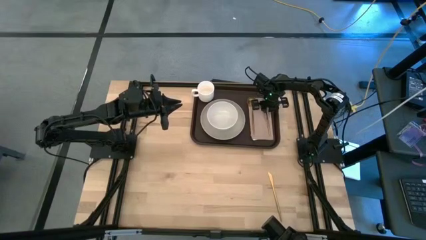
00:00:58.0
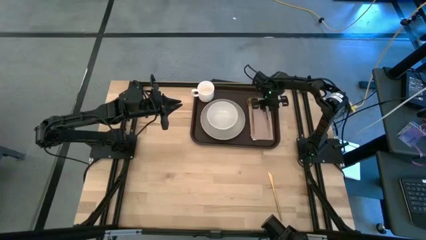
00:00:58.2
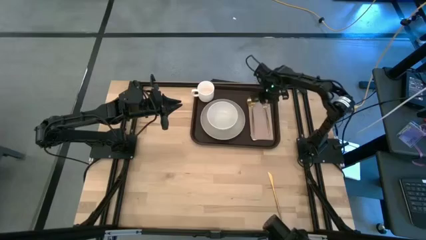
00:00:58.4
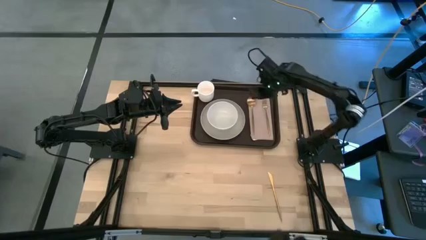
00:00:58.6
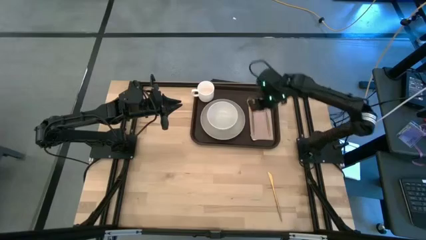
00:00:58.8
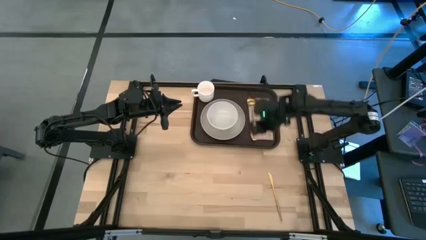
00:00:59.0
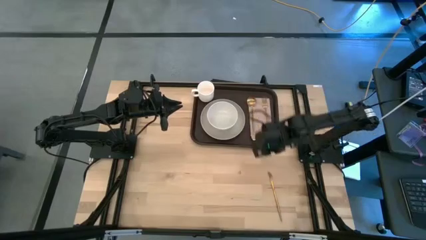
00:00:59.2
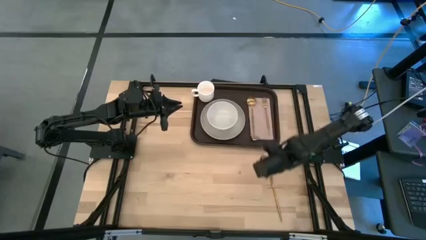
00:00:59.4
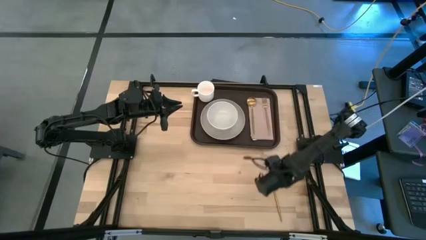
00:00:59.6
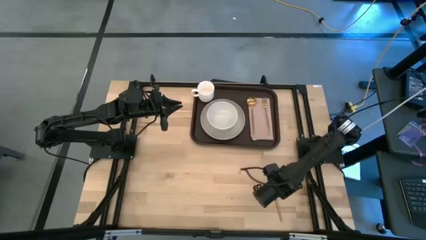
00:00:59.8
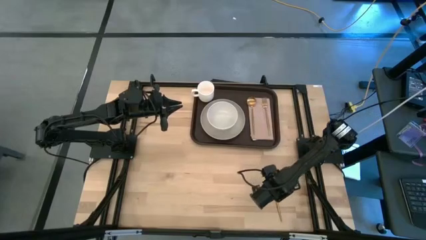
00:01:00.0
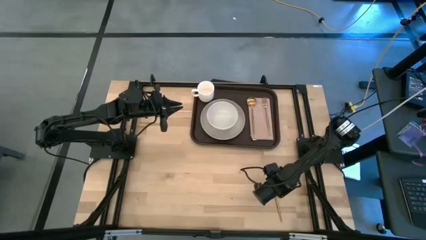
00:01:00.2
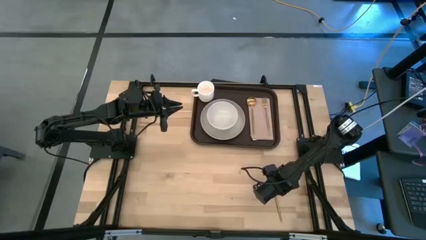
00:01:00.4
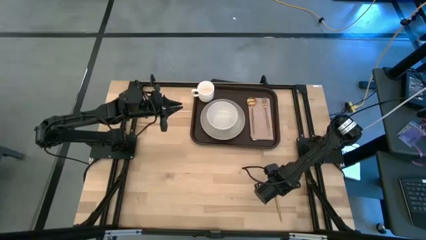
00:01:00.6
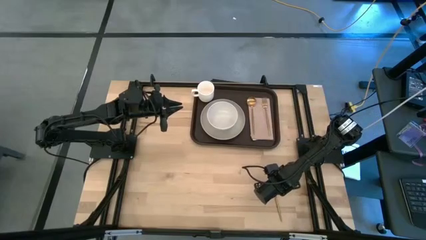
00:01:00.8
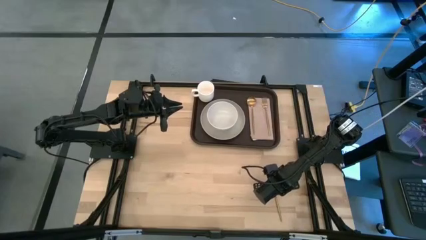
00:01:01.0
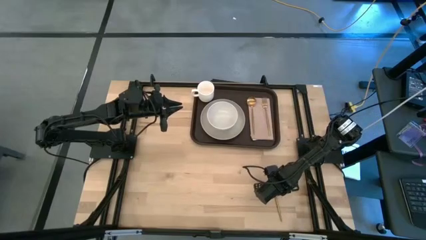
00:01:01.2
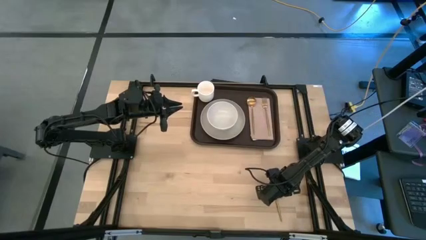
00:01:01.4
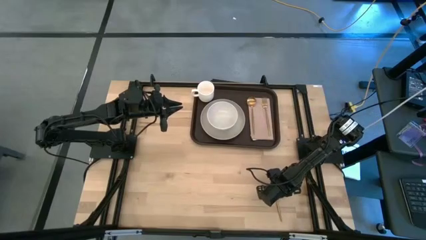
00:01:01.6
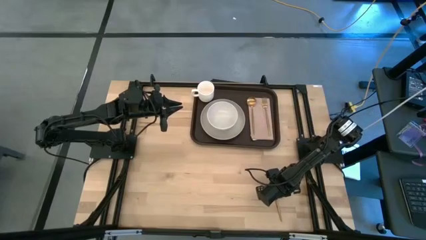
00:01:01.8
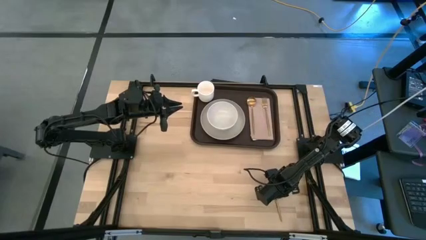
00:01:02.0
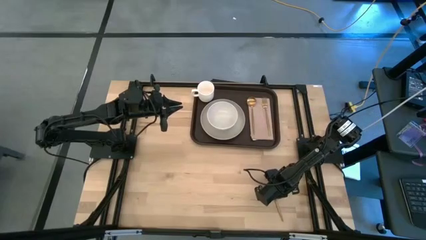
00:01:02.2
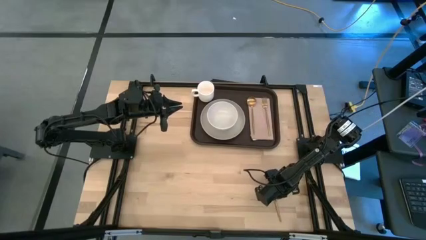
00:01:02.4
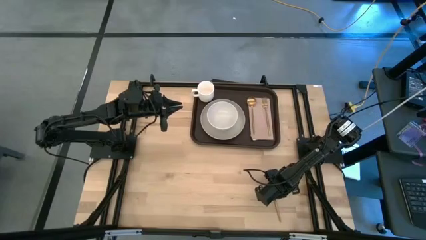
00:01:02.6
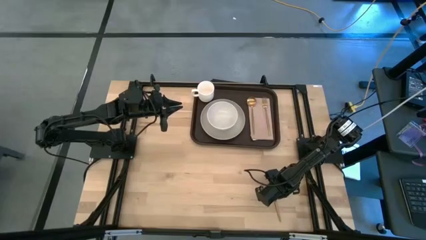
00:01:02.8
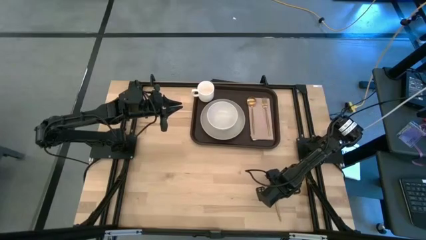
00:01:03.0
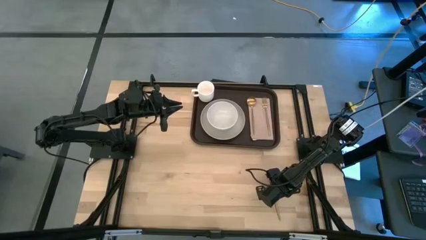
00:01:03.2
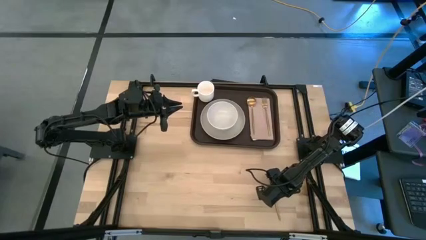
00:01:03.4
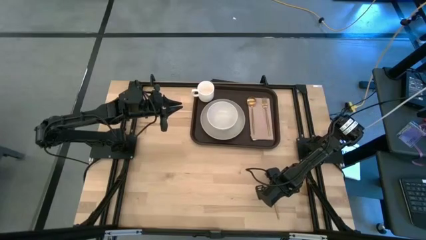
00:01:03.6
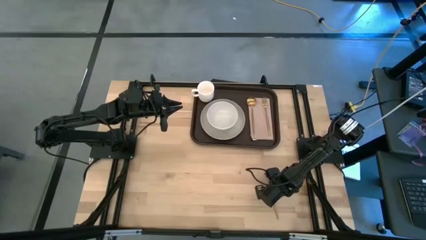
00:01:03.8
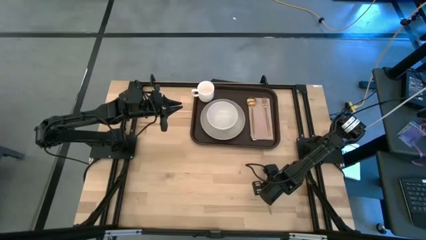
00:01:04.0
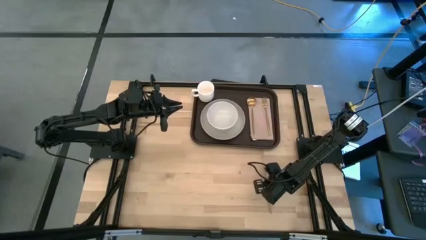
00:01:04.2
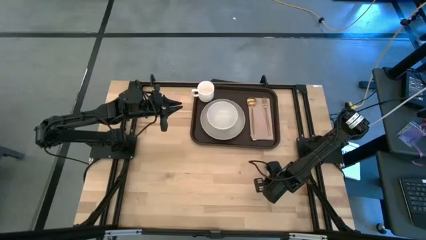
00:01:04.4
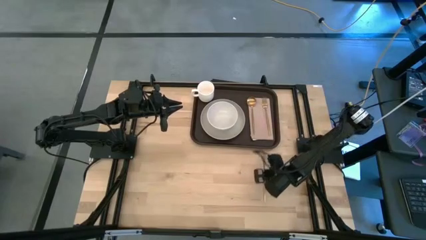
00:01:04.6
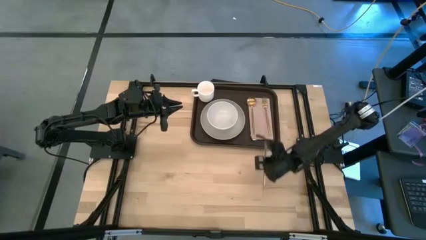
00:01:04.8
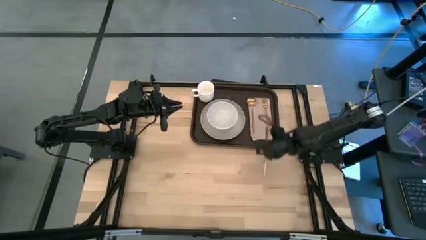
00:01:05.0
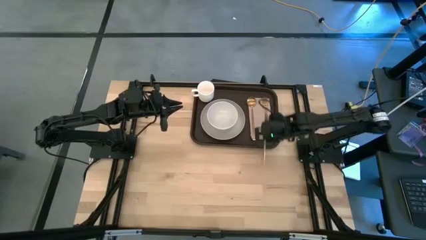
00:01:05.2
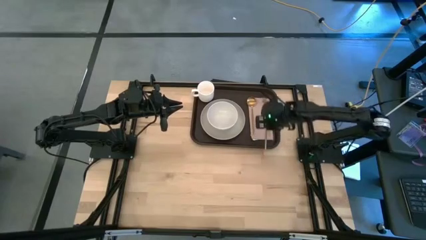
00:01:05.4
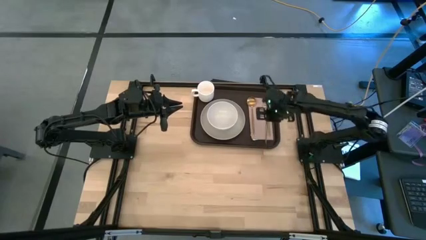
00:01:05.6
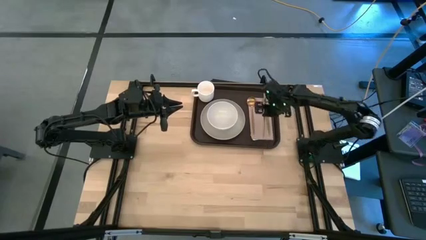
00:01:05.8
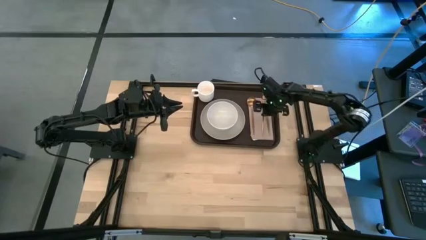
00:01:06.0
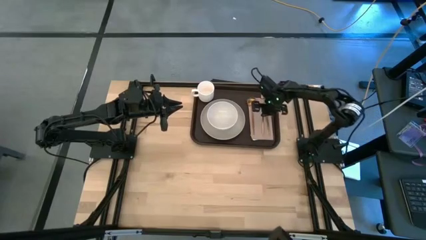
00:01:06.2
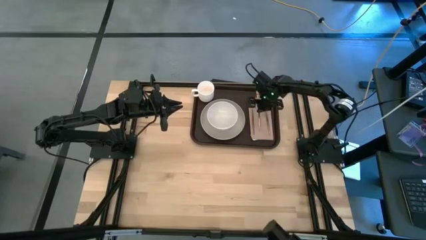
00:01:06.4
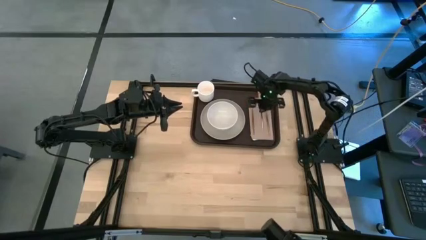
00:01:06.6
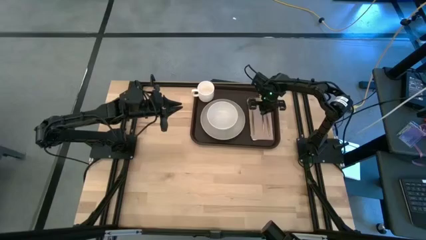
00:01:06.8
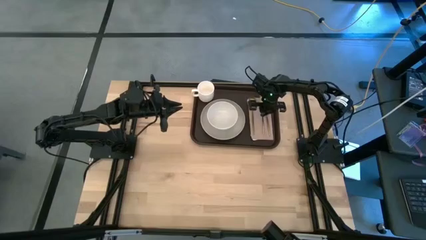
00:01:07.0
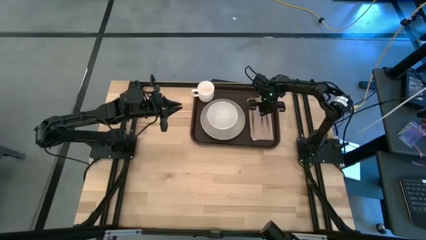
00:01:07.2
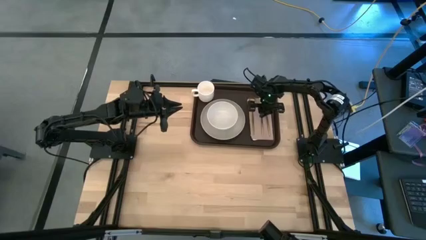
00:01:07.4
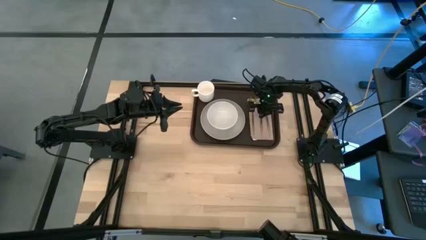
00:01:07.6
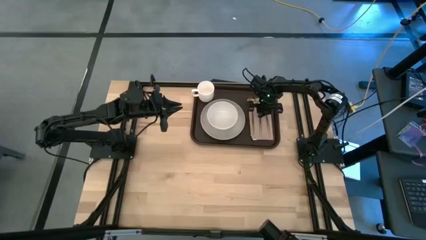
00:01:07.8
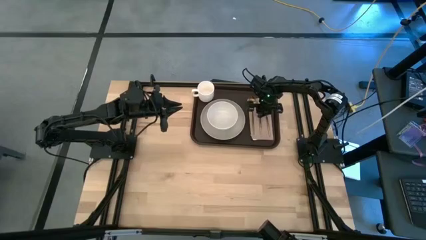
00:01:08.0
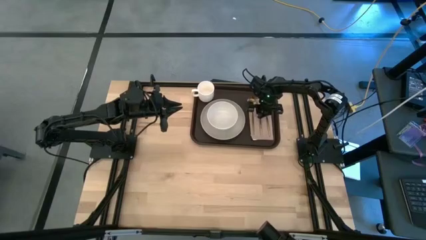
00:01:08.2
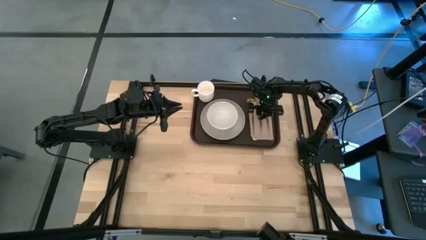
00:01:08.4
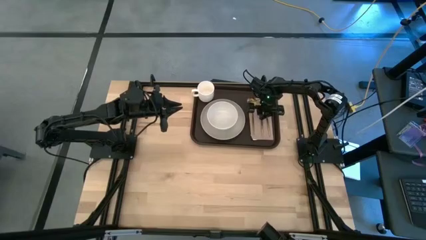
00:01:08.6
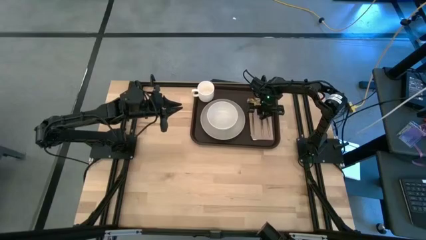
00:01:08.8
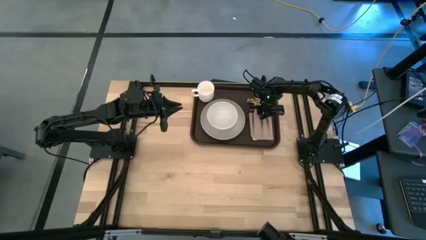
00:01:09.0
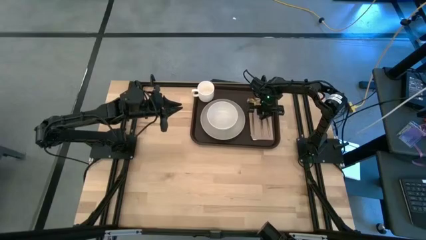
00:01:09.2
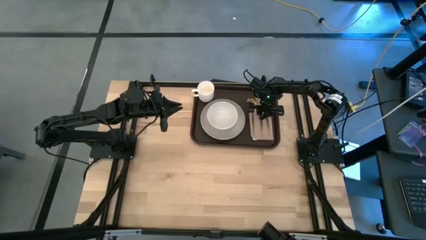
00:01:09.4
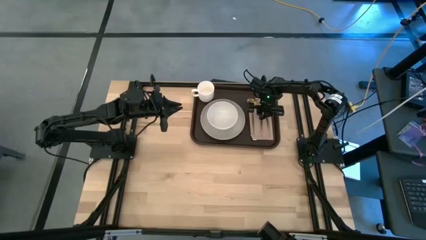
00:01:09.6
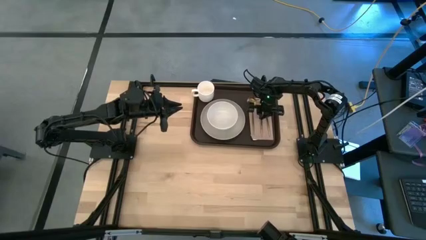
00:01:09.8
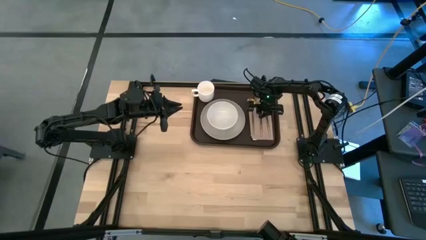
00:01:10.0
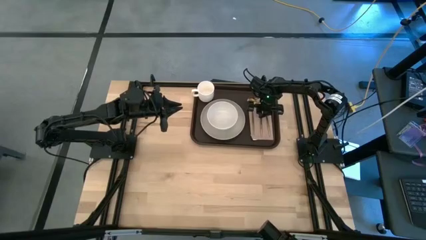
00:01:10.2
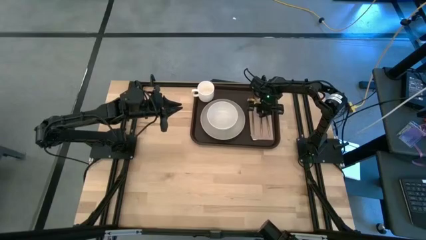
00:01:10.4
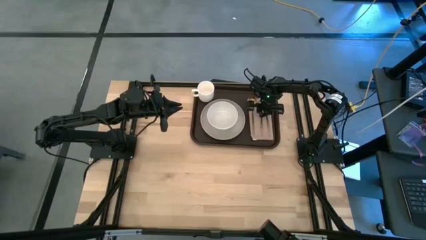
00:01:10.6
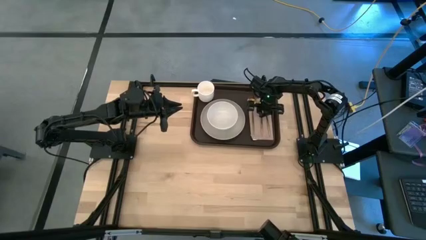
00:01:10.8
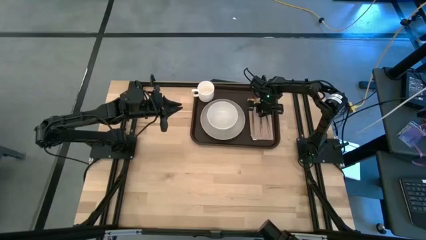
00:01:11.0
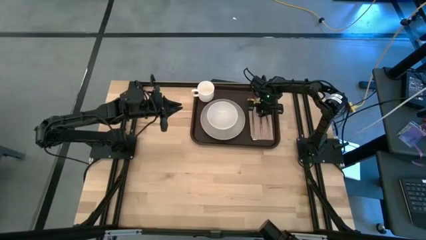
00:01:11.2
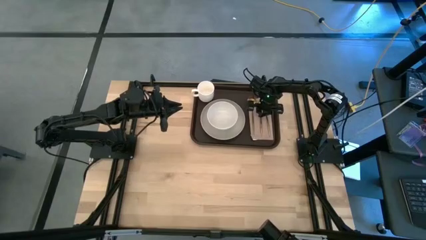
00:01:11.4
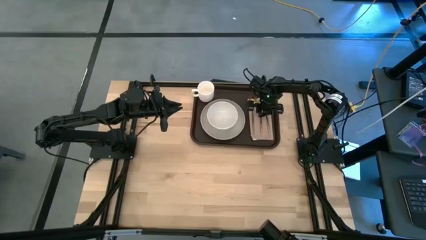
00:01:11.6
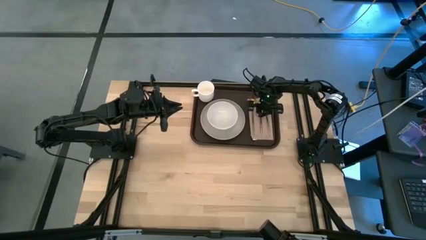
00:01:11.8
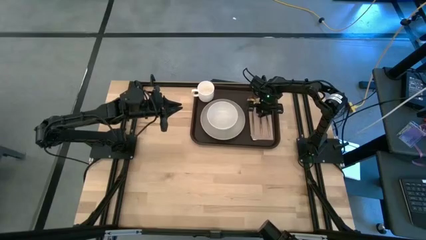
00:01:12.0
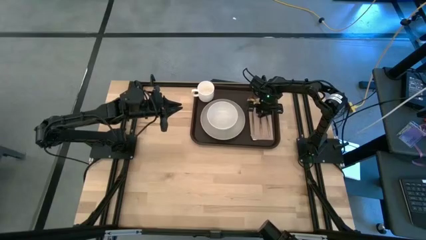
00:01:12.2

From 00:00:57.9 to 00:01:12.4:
Task: Set up tray
Put the gold table knife to the right of the gold fork on the brown napkin on the black serving tray
